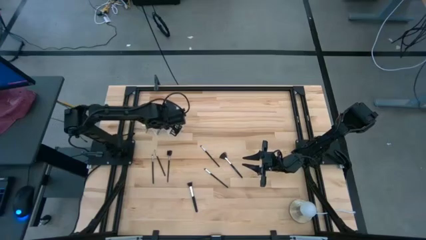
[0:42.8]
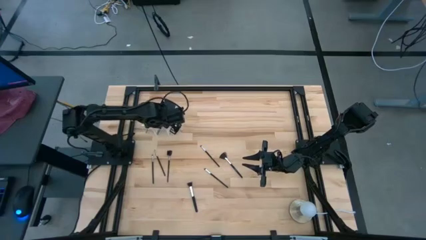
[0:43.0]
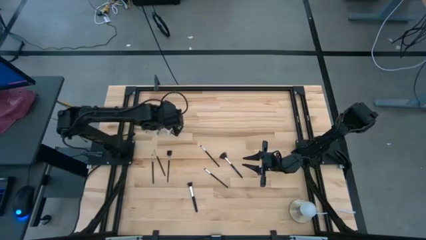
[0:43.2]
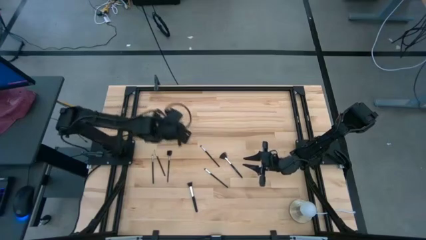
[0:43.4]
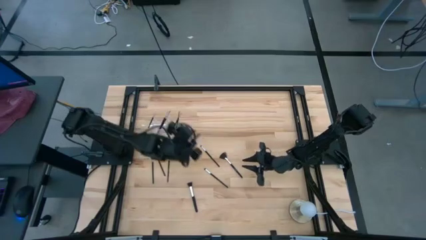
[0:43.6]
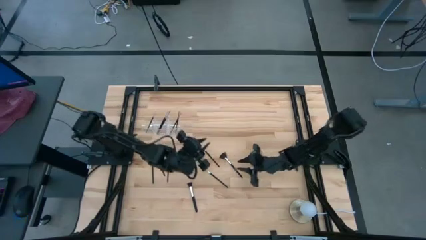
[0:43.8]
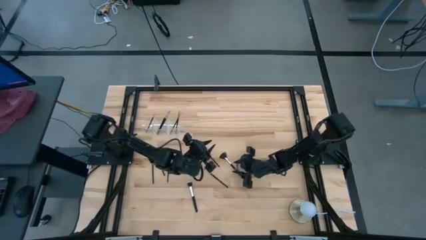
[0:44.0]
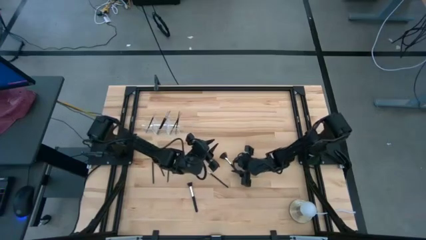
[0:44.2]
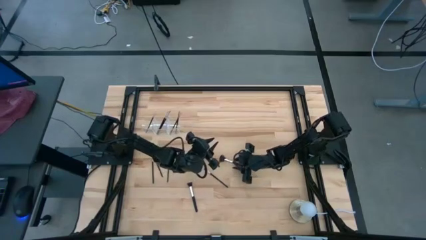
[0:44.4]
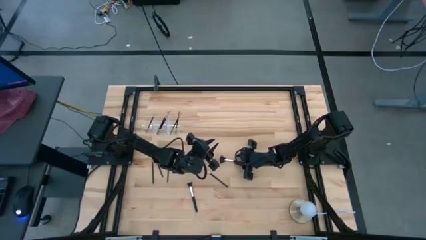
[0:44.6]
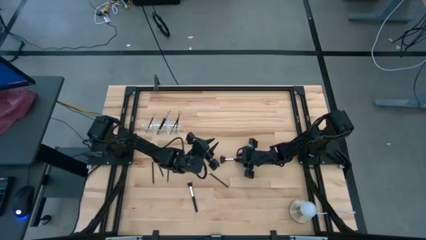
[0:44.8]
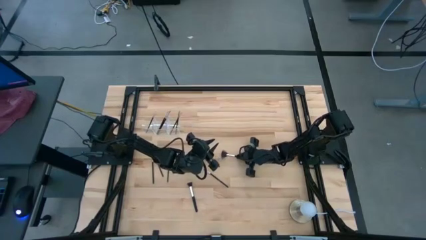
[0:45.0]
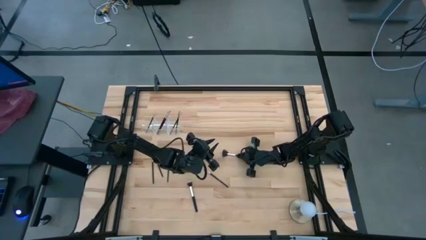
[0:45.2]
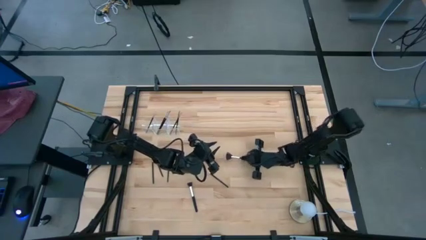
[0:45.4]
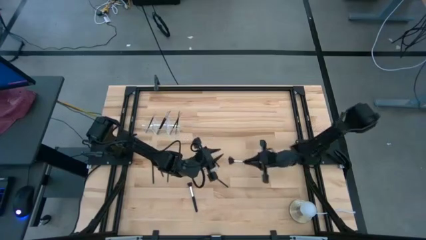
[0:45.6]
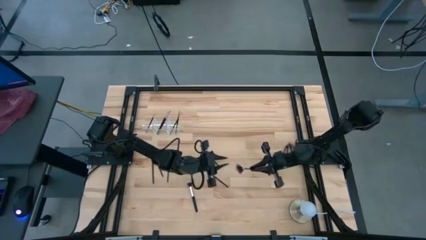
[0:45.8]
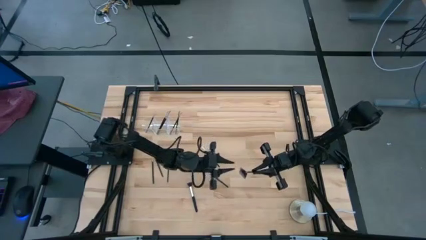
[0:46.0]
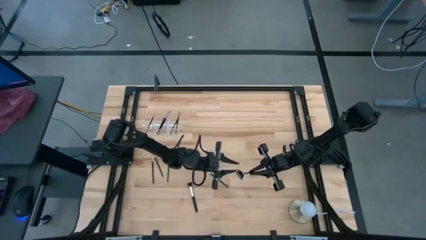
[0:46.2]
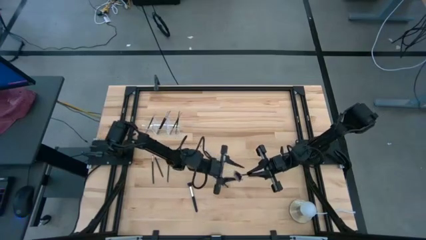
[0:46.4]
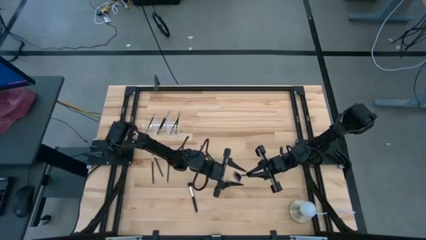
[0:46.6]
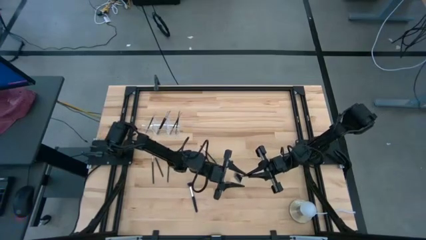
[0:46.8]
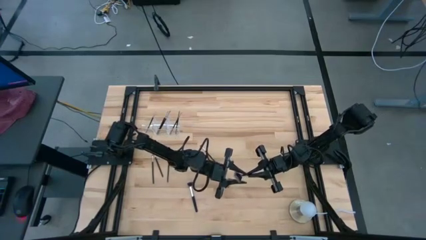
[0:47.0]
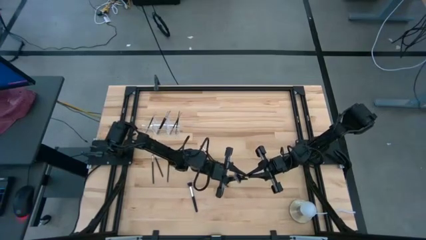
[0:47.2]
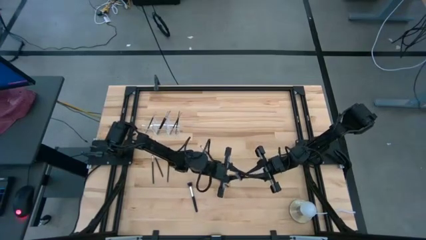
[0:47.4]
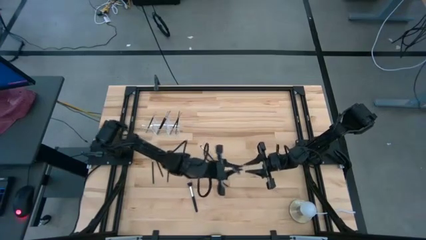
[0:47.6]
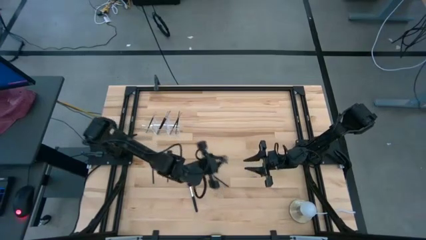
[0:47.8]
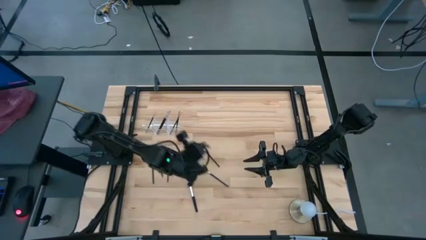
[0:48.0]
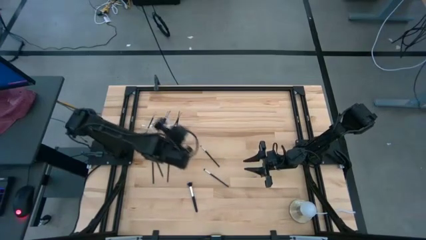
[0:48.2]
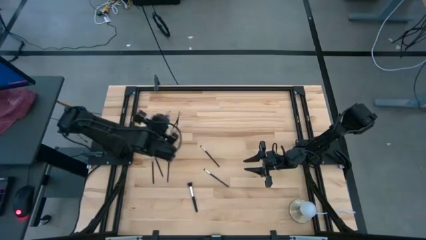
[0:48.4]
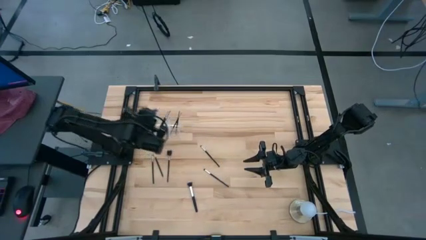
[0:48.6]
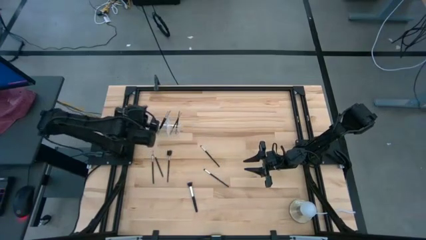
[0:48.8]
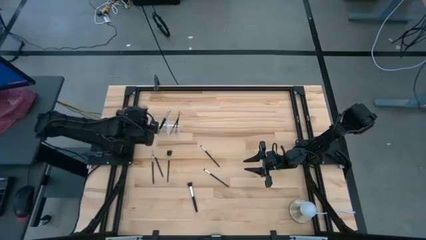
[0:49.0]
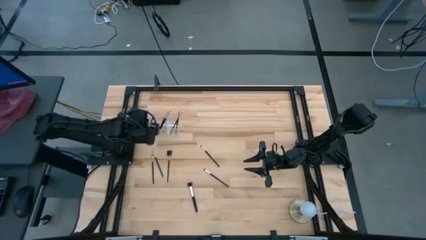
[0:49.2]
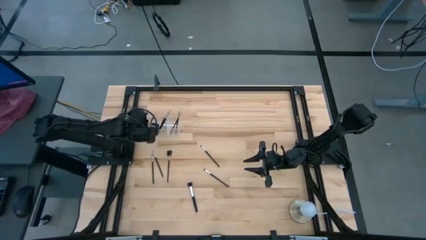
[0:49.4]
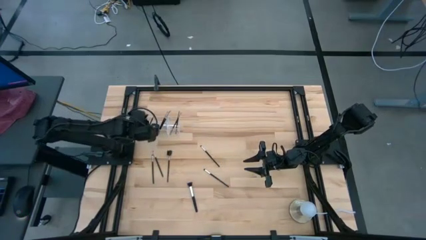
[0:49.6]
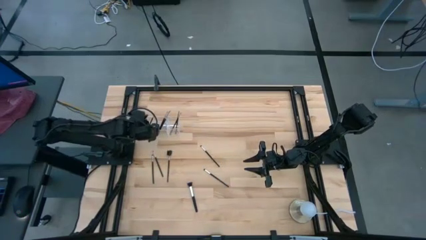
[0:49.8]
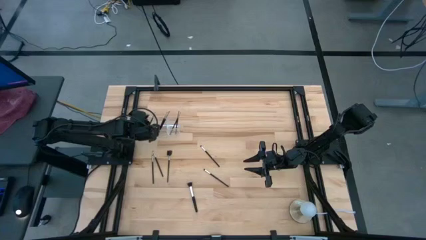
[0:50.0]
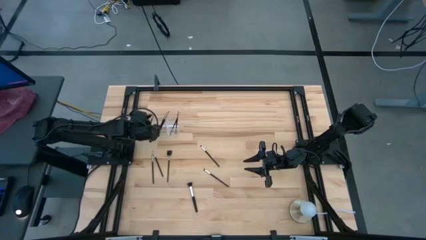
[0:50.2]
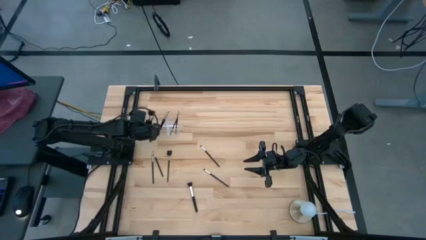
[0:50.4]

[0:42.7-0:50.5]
Task: Put items in baskets/containers
Put the highlighter brush into the transparent organizer

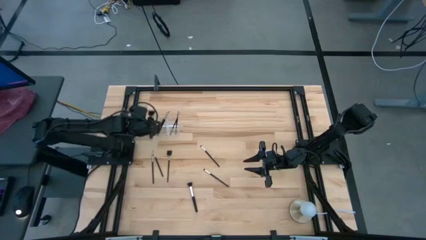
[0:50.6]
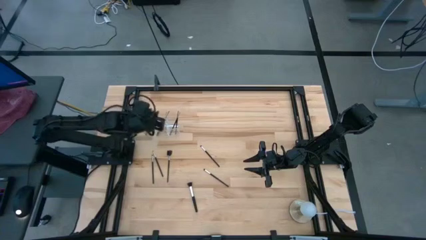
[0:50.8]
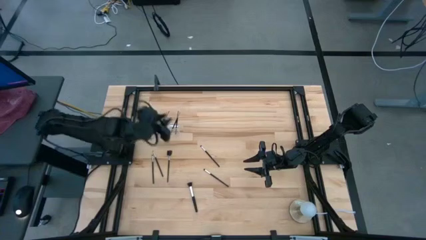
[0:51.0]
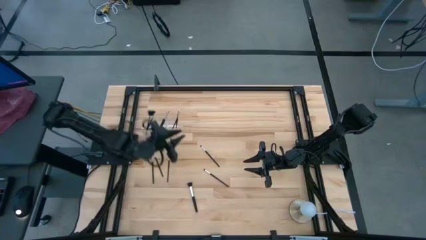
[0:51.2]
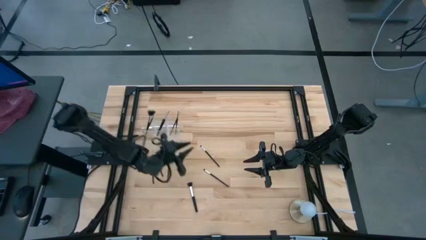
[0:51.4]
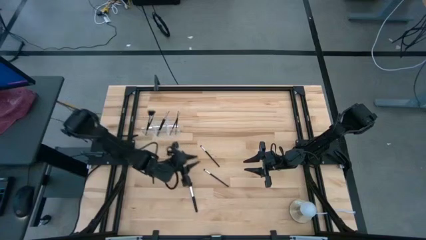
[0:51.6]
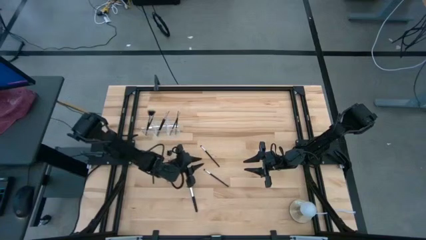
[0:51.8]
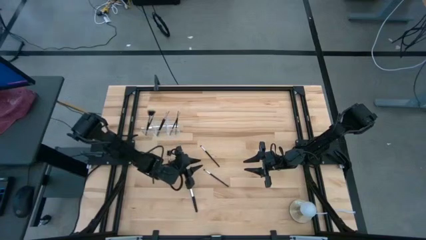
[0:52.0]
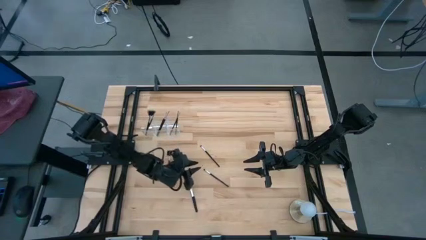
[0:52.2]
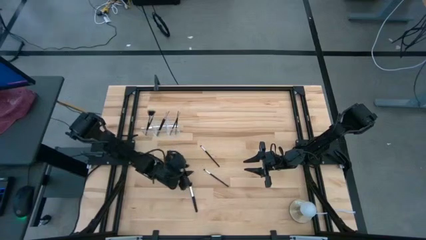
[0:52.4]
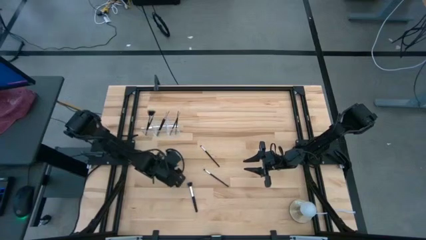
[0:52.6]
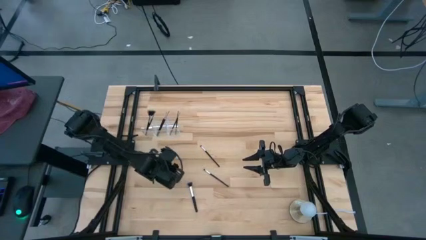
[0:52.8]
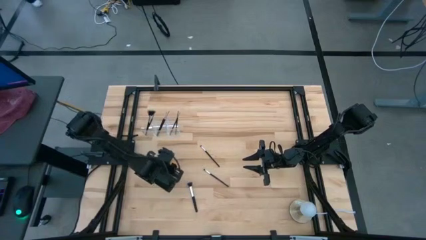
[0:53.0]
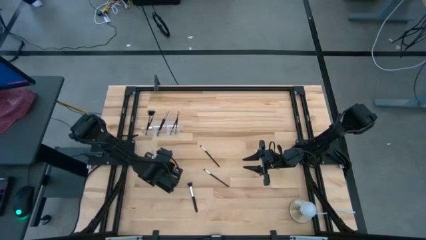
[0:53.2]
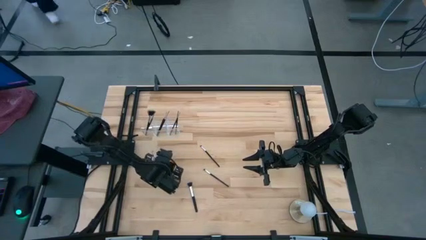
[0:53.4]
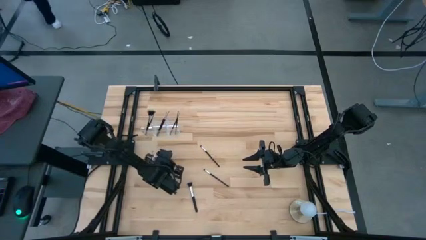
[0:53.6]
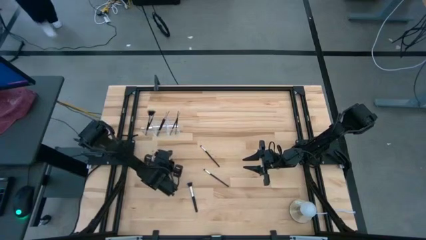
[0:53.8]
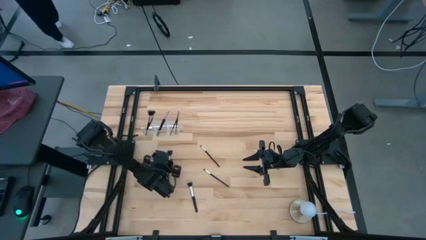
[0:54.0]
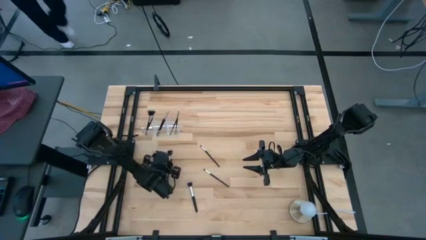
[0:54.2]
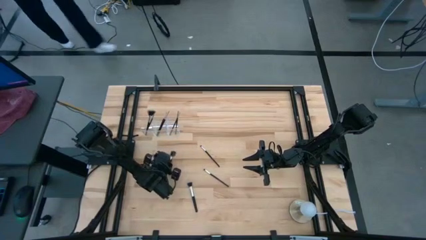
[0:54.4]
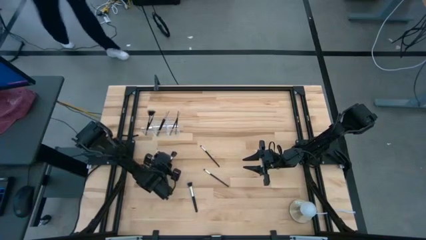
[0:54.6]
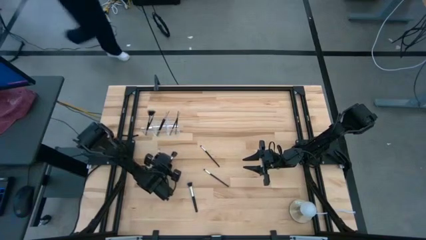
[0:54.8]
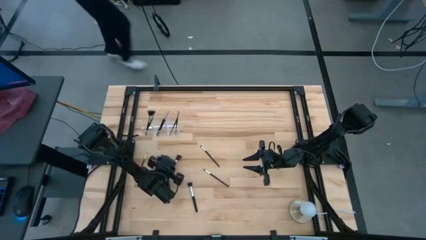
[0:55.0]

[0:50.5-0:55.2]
Put the eye groomer brush into the transparent organizer
